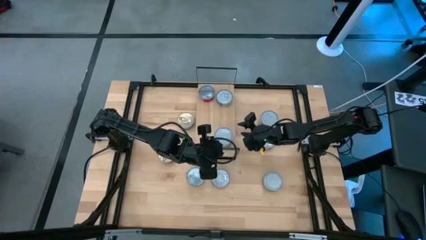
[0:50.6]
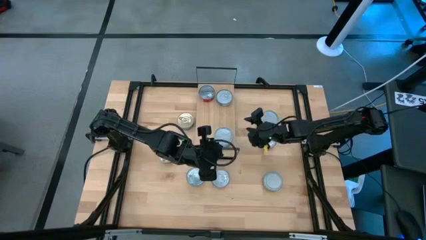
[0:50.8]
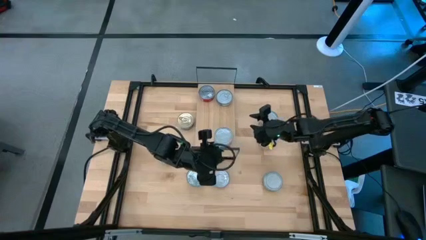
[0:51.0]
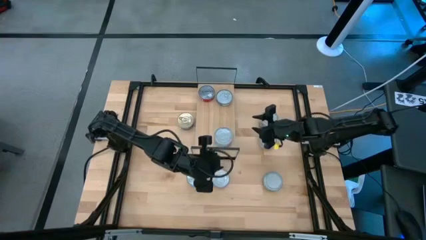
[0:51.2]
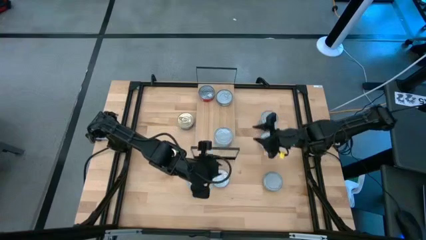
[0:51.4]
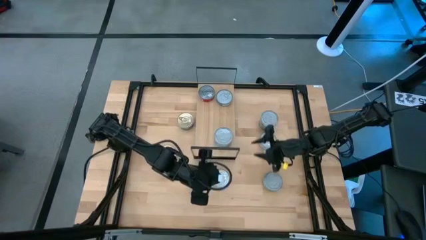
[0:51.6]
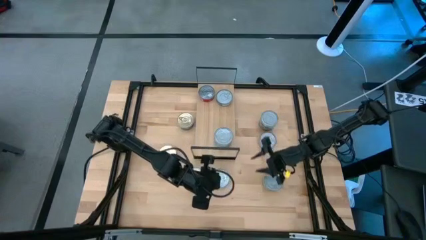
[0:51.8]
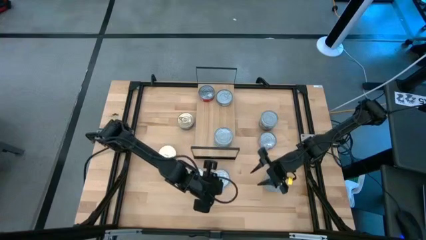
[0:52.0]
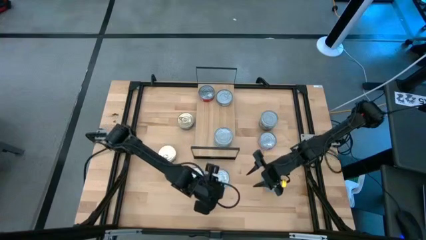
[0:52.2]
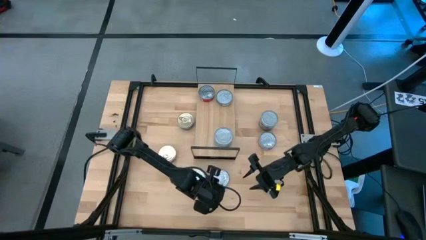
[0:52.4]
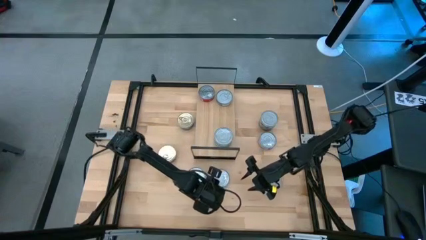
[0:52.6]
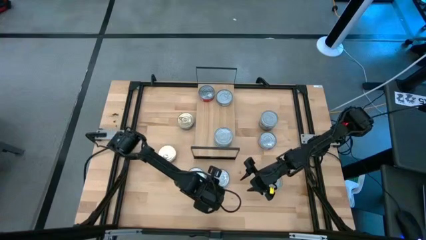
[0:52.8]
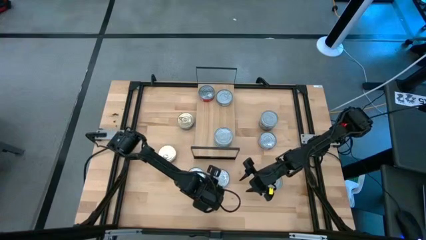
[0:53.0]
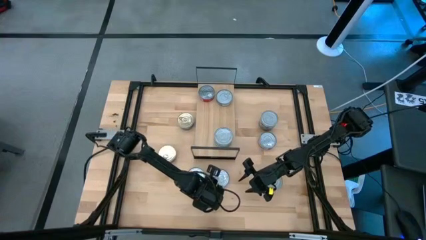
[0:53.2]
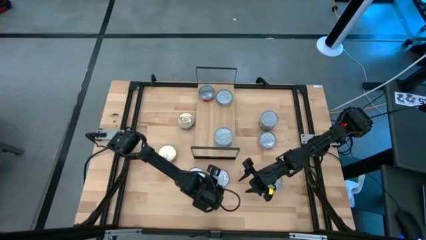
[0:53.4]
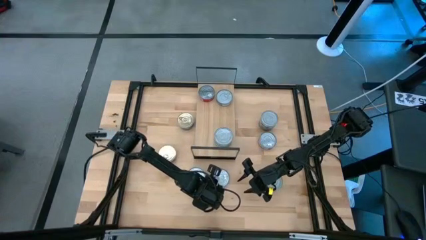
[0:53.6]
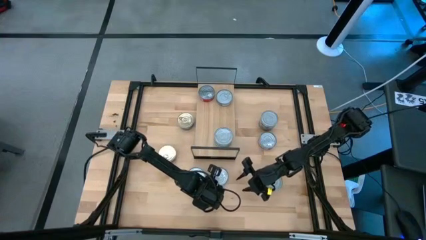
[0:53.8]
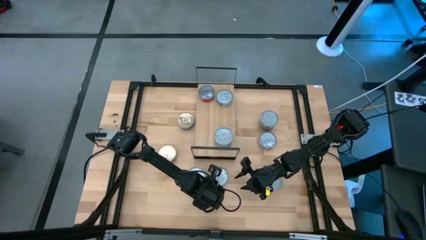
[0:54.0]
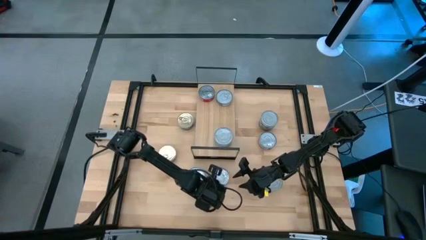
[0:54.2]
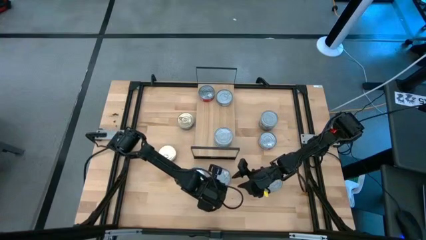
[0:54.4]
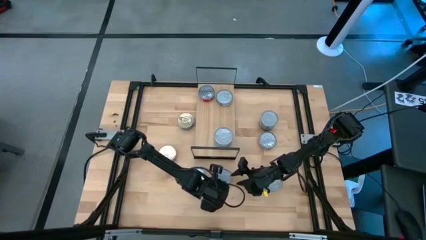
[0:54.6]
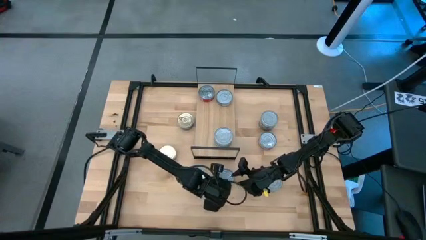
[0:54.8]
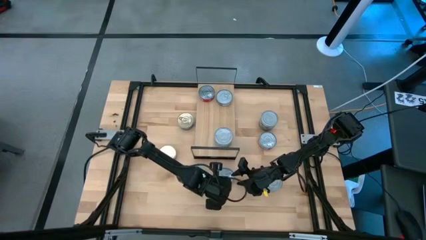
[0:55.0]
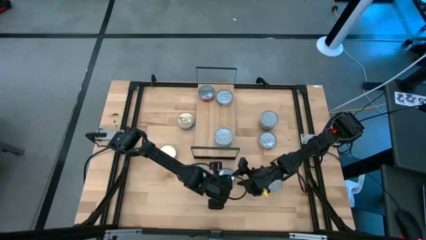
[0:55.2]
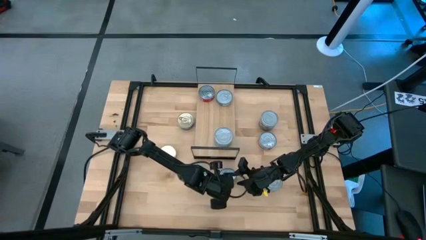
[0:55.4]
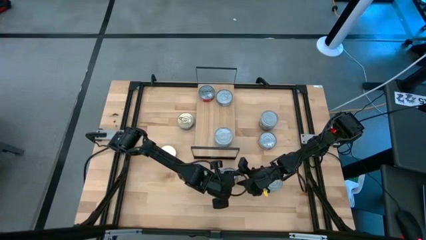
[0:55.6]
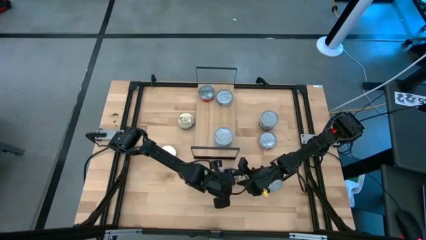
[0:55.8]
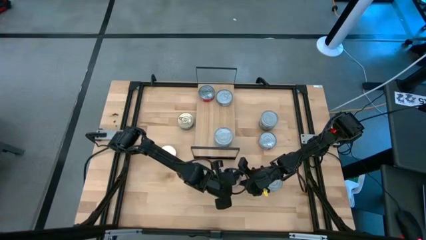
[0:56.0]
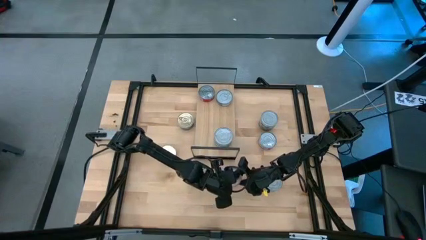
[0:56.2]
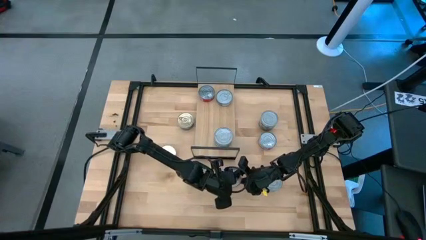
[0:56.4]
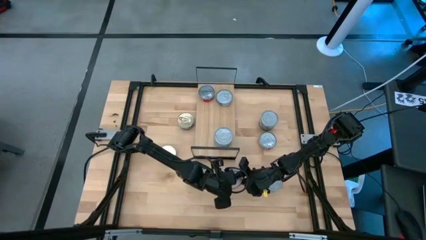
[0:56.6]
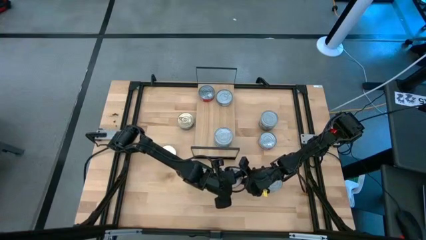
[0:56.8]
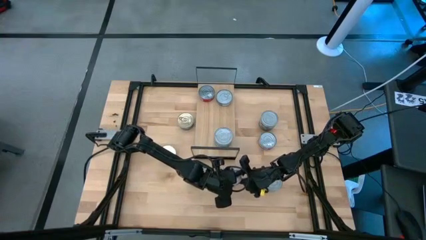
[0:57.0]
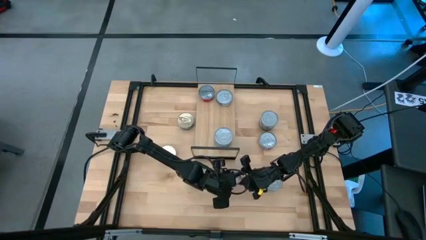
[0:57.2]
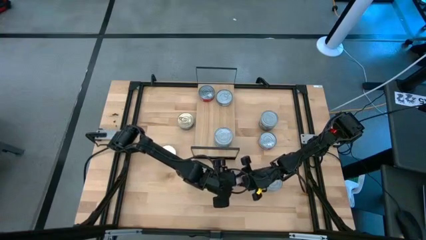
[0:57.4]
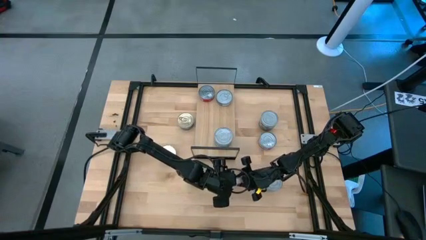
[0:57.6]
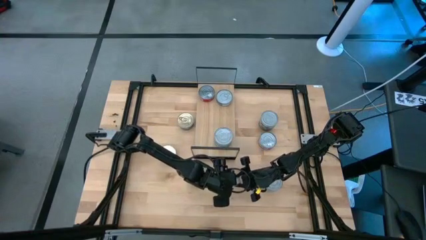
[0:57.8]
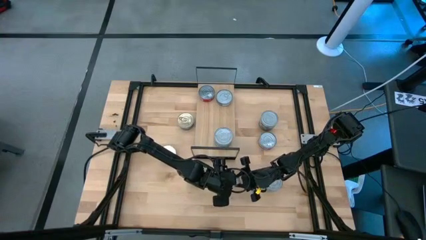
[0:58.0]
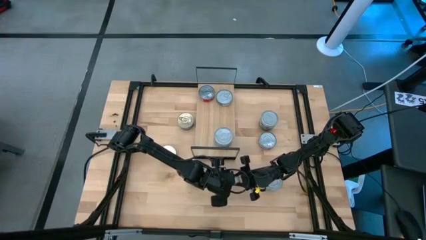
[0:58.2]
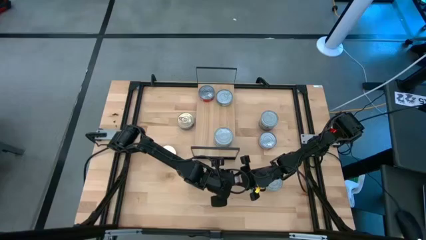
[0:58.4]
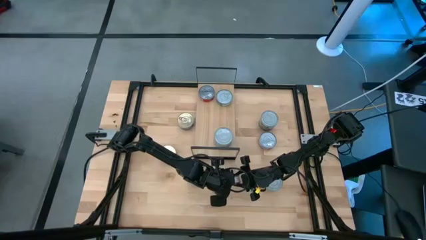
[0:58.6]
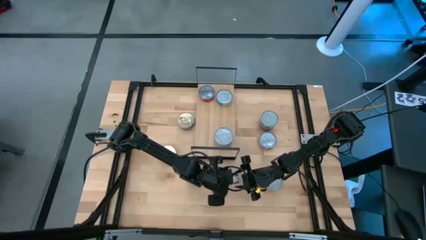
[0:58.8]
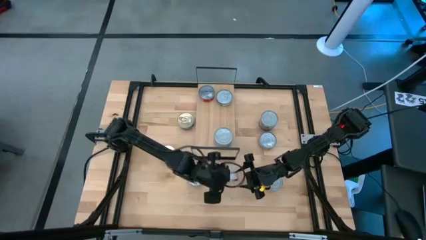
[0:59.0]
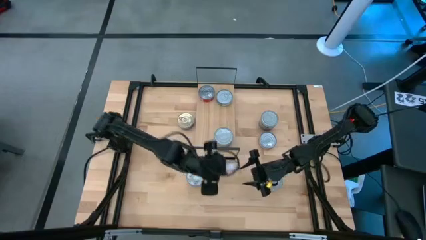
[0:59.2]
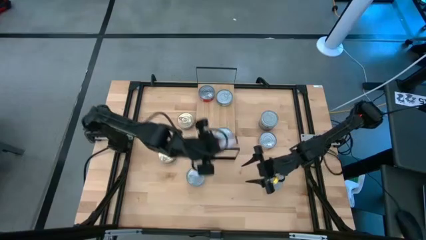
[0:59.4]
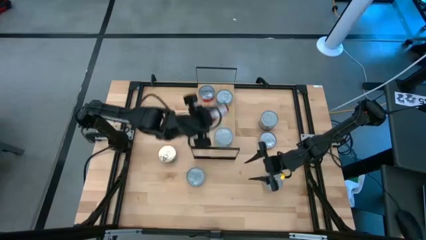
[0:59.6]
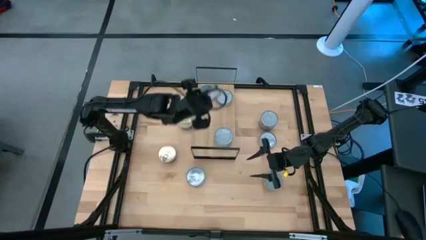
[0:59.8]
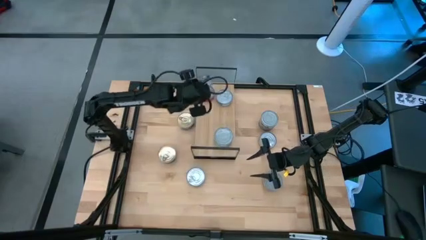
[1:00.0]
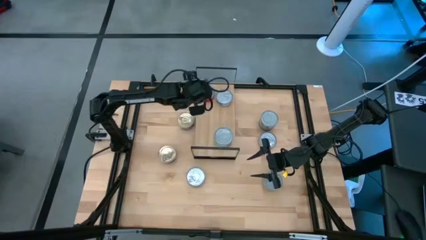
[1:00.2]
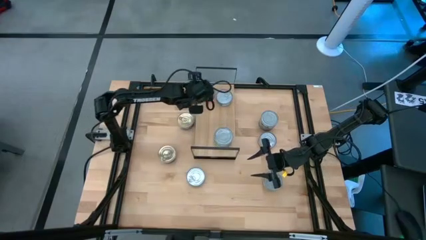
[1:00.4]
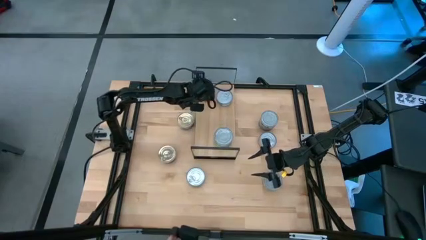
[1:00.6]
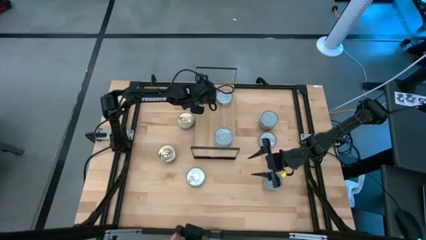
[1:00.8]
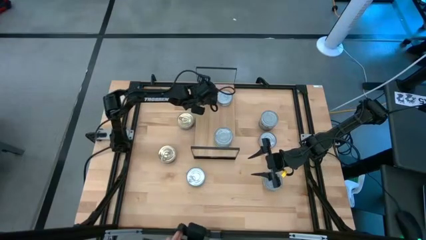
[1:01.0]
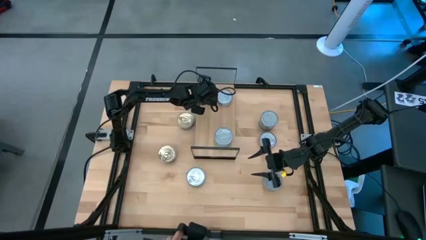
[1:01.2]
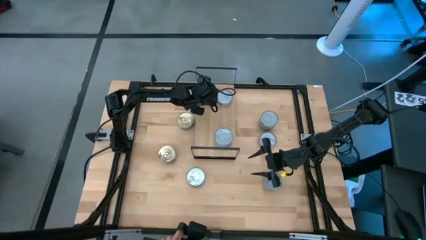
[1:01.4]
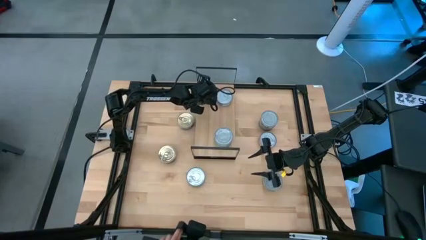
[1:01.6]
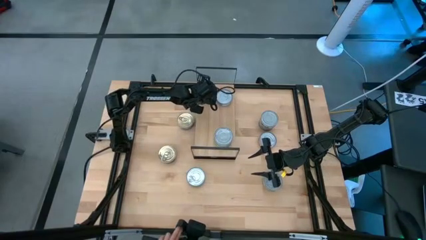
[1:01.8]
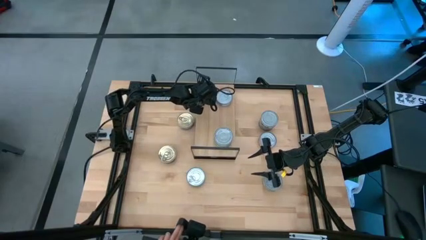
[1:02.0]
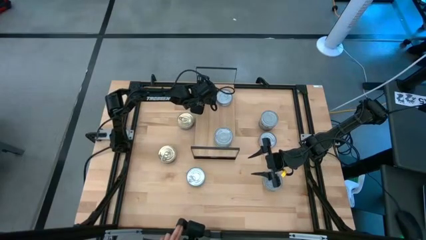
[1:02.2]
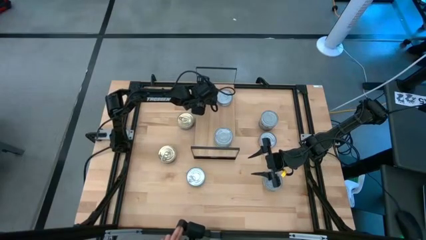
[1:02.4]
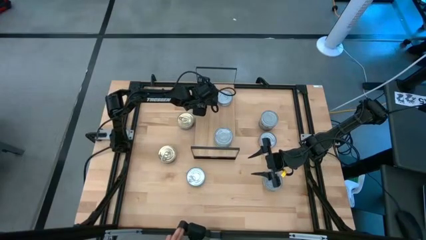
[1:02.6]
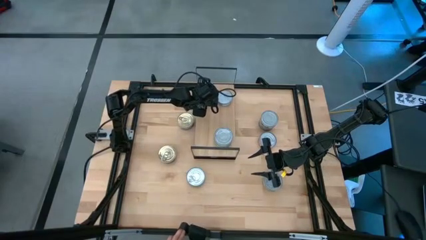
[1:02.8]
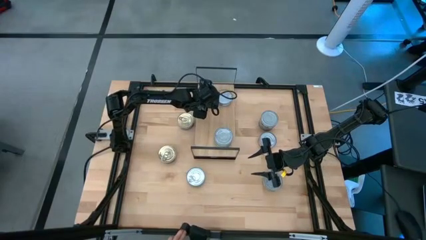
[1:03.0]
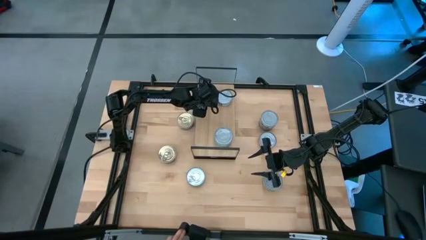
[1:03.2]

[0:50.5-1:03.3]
Task: Stack canned seafood by type on shelf
Stack the red tuna can on top of the other red tuna can on the shelf
